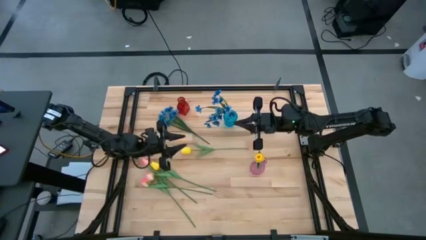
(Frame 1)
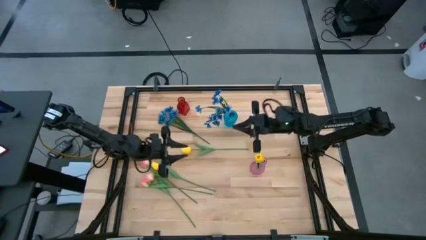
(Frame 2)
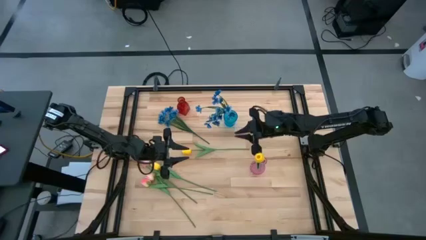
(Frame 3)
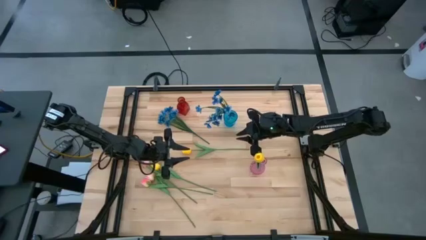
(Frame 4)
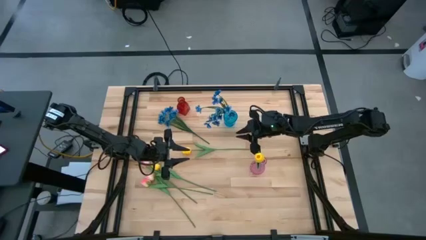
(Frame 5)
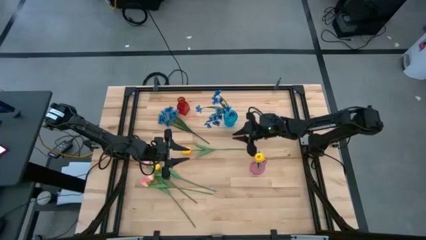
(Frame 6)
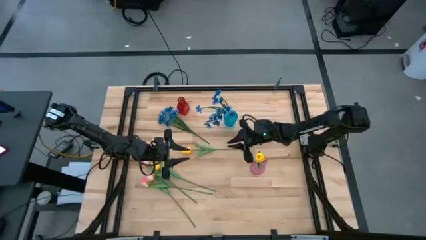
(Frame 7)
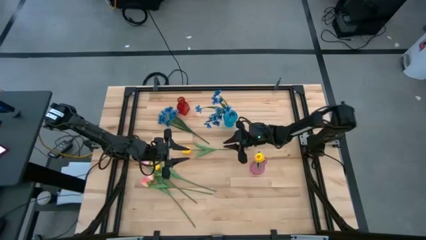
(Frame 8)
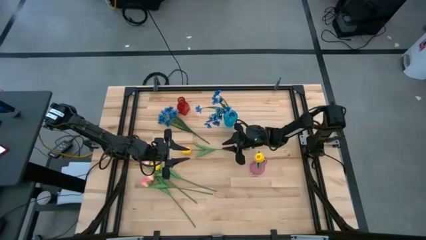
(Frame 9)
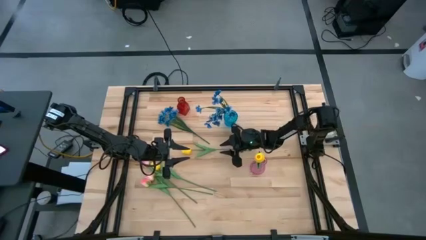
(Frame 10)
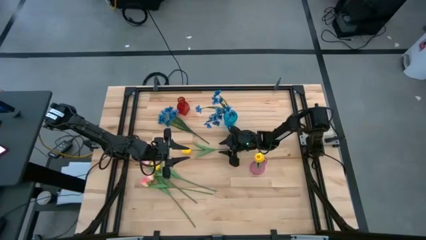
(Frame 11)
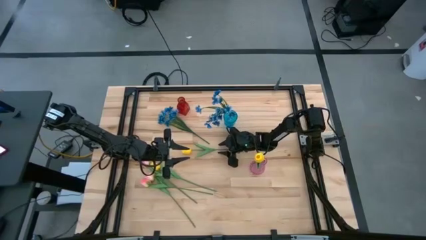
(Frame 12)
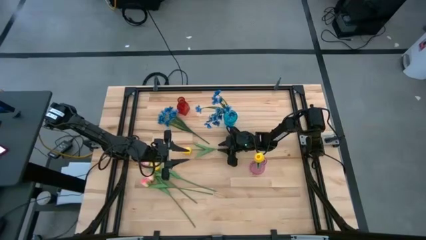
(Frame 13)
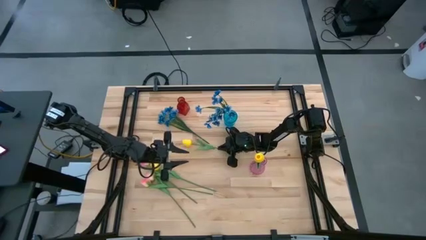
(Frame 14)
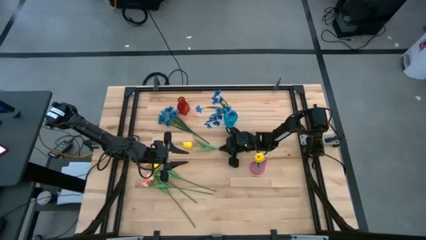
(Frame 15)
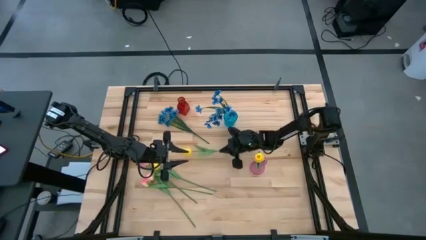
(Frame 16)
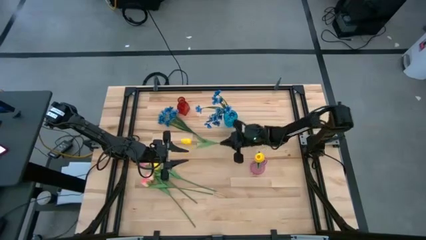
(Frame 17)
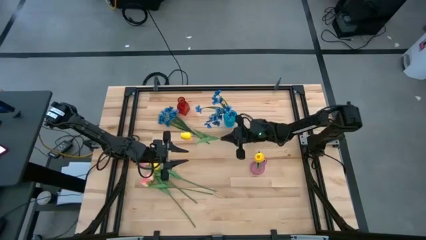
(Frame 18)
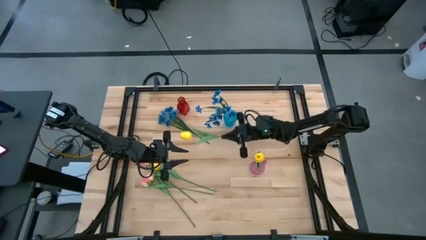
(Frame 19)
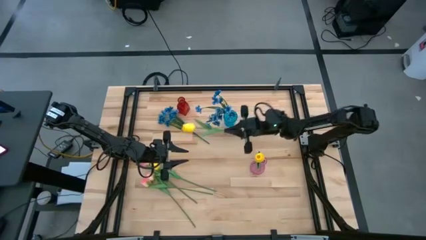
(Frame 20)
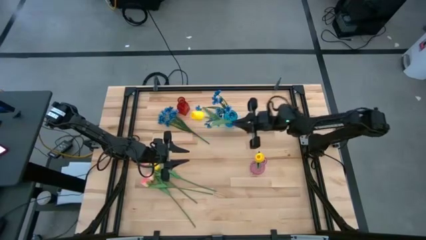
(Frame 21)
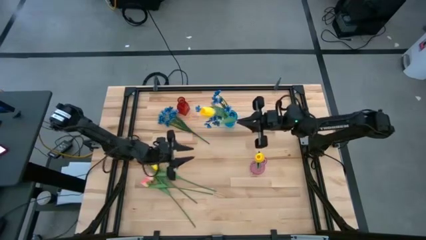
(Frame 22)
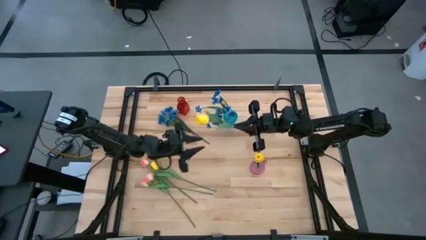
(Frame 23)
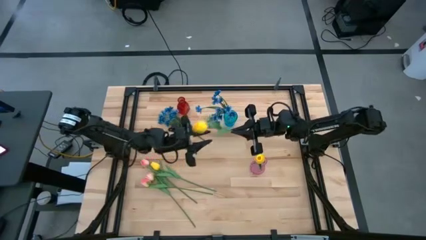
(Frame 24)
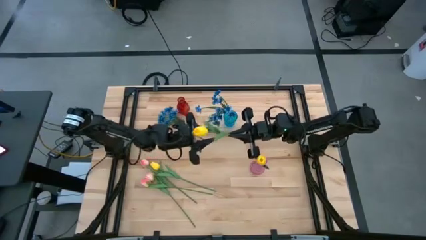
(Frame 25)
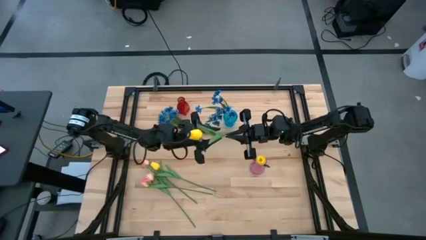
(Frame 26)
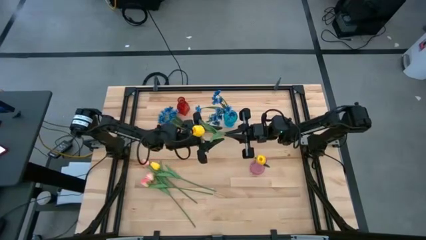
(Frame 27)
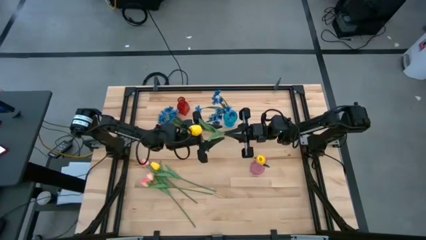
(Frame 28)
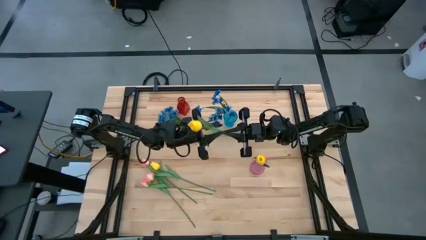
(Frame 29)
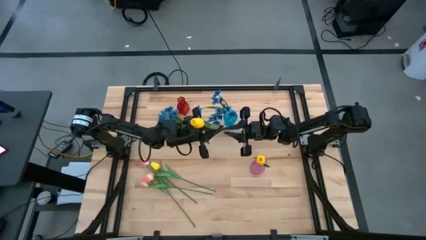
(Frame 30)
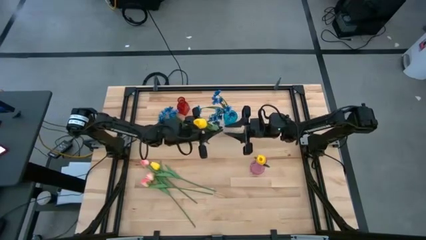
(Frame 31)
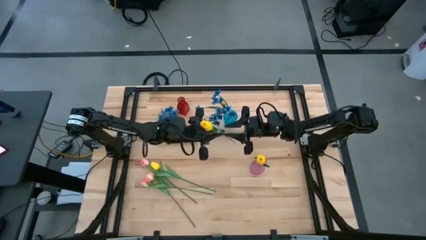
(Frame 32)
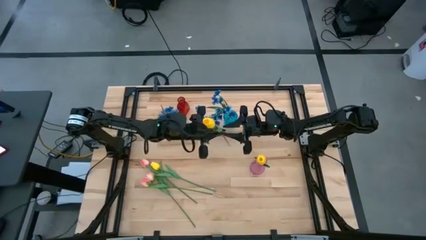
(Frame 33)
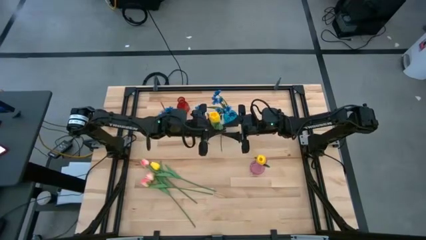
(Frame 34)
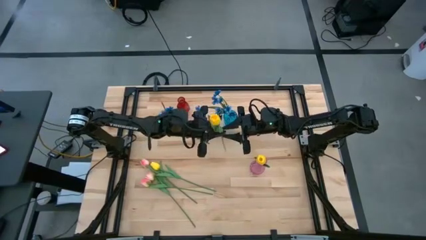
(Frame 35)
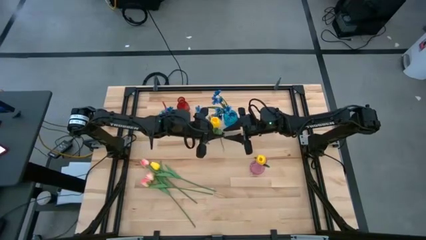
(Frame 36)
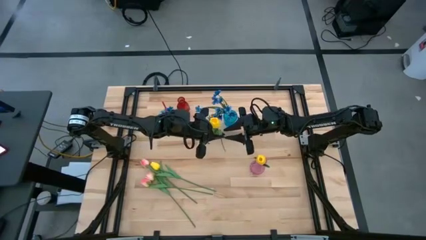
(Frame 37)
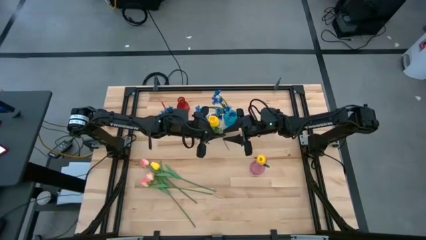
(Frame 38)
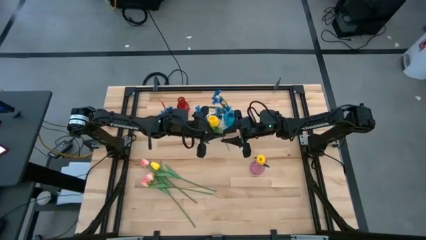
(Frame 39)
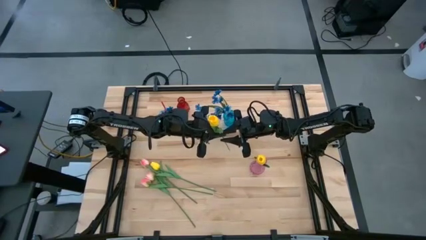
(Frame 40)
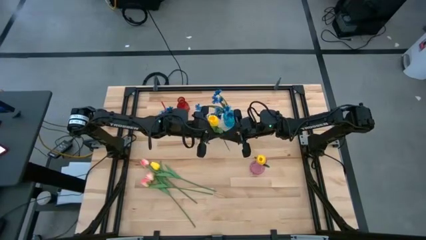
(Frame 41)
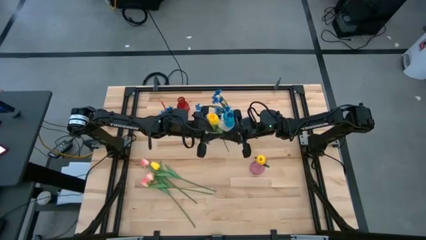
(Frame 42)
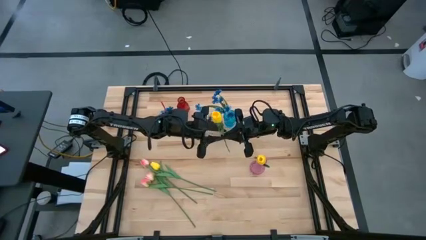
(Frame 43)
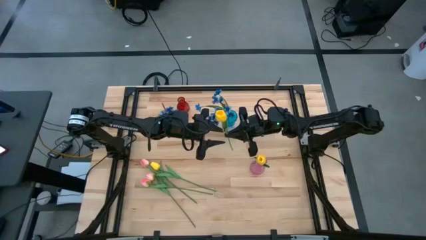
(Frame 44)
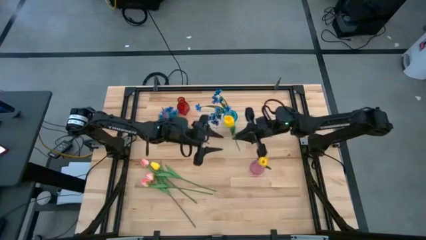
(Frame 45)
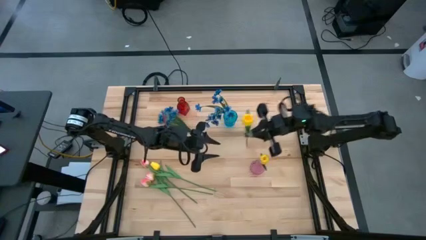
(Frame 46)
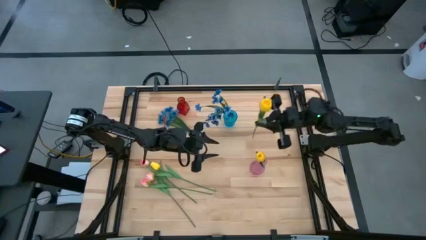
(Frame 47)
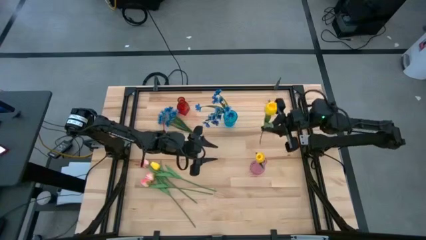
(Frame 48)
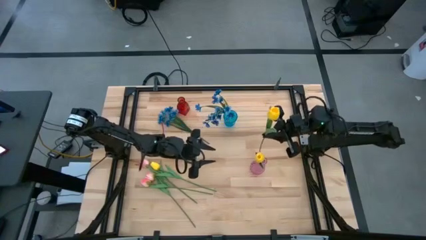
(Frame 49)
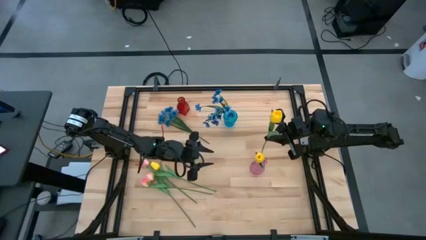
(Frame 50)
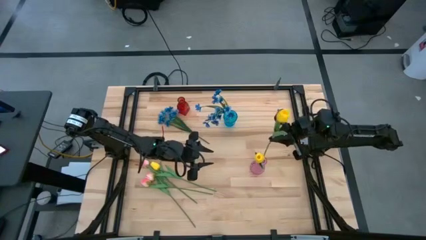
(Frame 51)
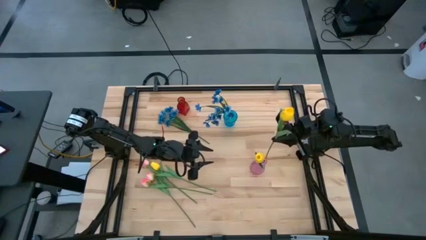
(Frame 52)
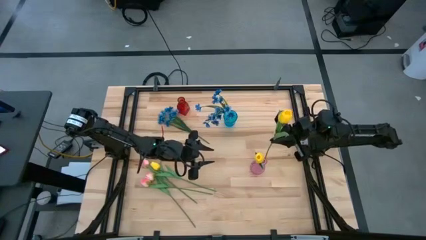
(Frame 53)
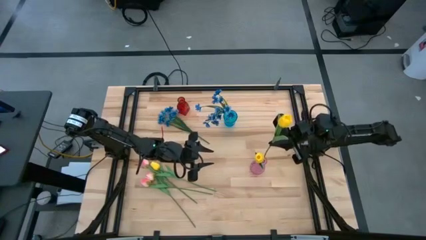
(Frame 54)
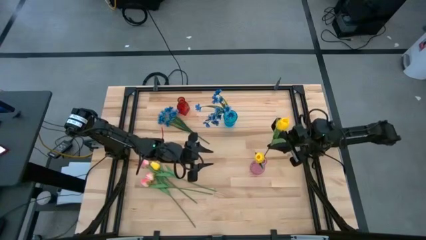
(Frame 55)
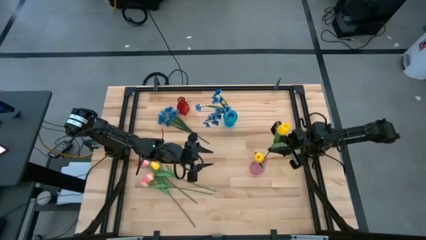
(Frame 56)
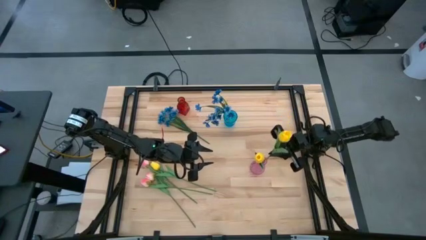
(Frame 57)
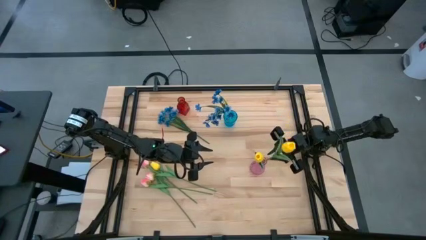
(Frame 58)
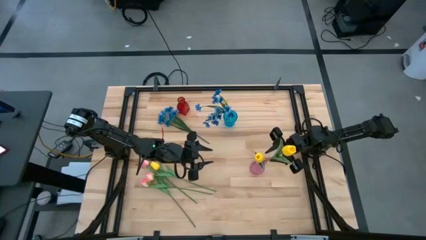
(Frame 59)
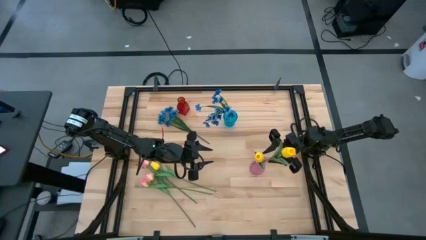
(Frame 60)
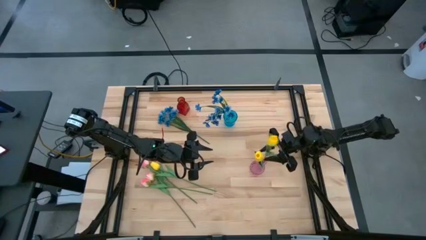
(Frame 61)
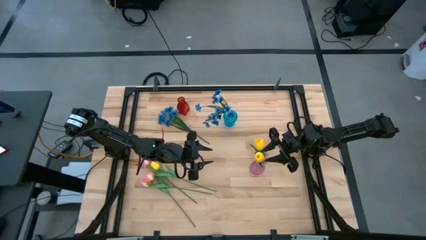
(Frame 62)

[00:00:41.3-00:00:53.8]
Task: Sort flowers into vase by color
Put the top yellow tulip into the violet flower vase

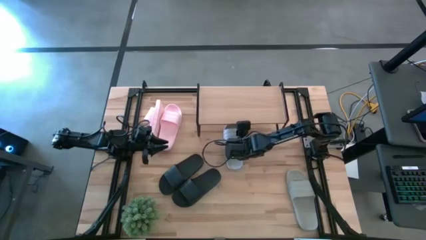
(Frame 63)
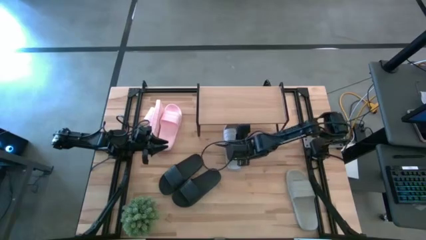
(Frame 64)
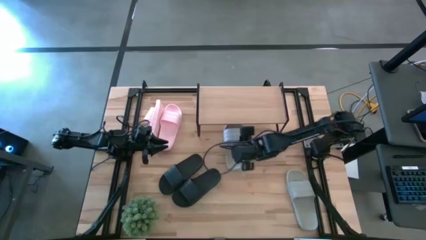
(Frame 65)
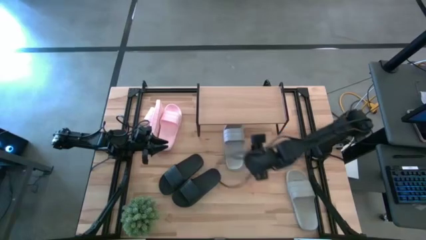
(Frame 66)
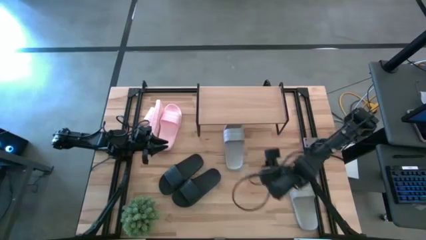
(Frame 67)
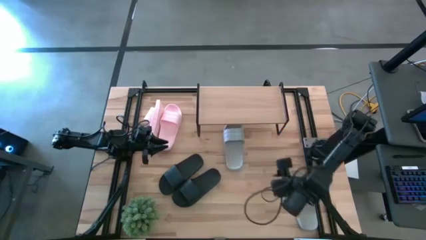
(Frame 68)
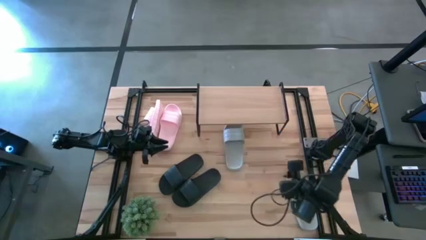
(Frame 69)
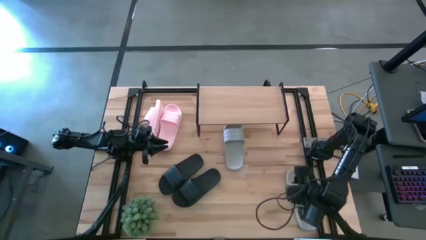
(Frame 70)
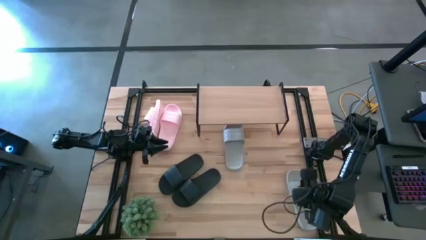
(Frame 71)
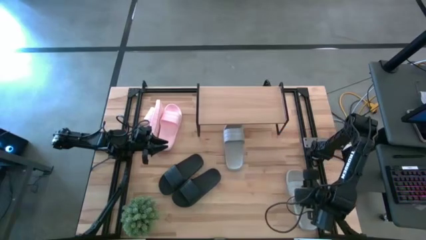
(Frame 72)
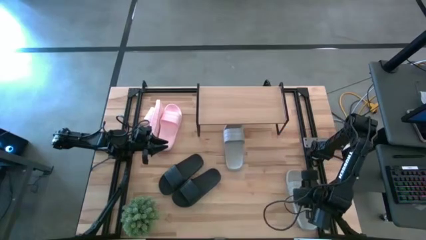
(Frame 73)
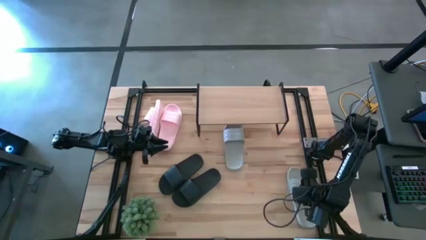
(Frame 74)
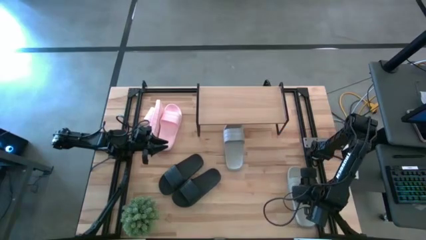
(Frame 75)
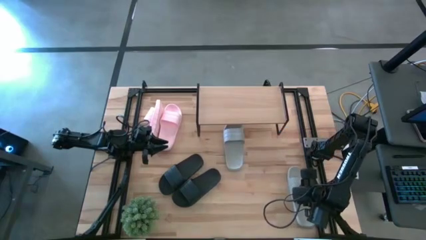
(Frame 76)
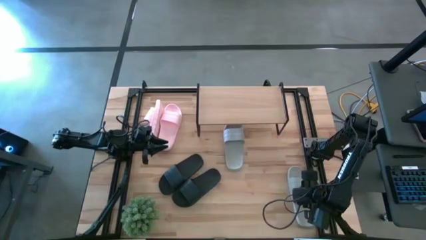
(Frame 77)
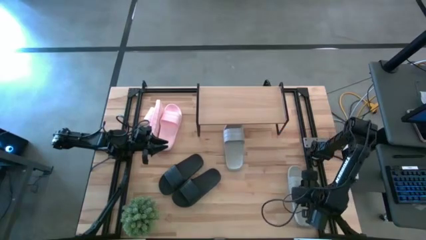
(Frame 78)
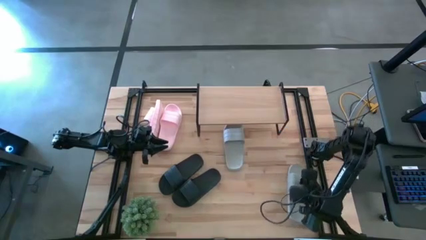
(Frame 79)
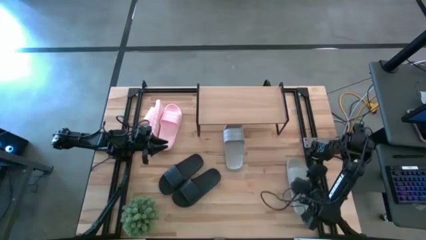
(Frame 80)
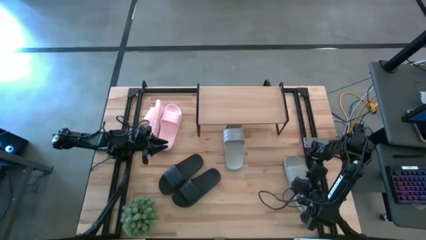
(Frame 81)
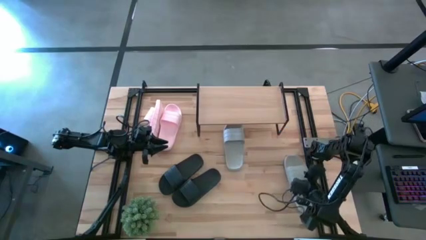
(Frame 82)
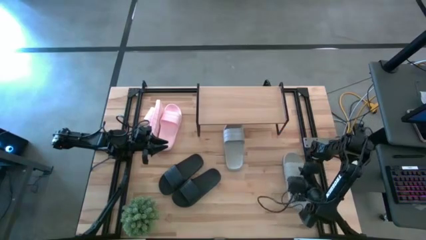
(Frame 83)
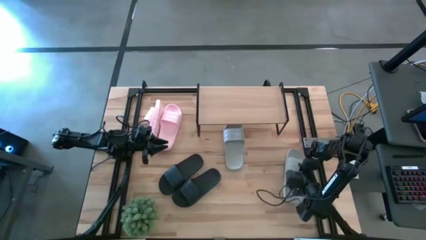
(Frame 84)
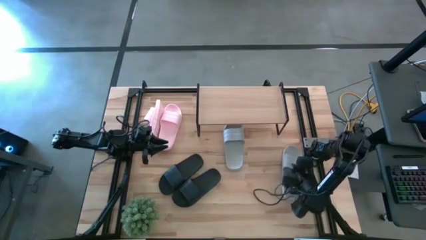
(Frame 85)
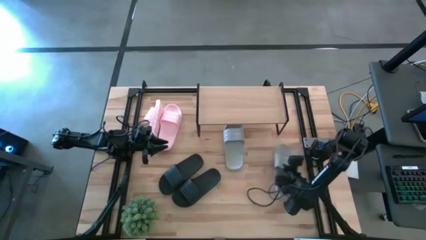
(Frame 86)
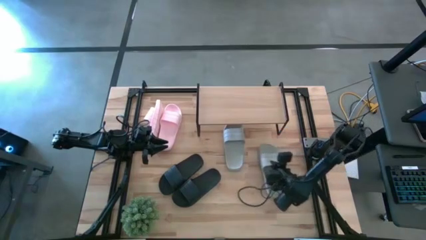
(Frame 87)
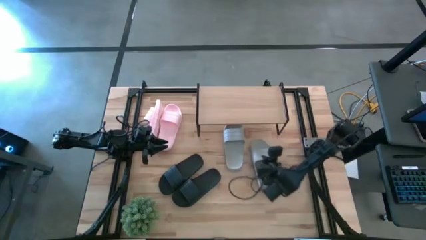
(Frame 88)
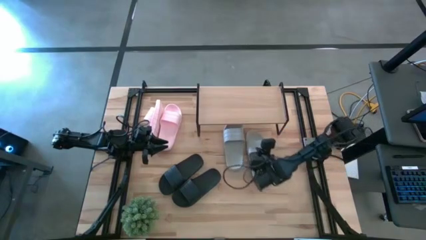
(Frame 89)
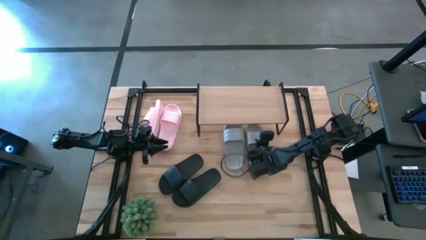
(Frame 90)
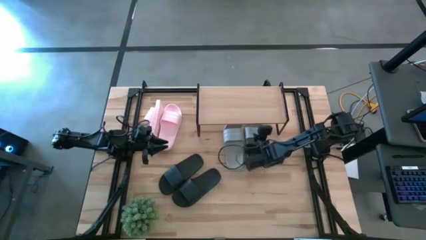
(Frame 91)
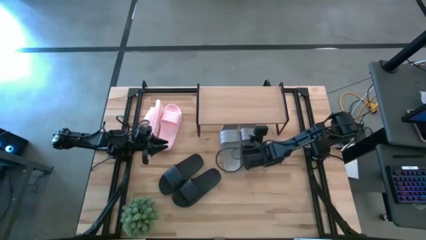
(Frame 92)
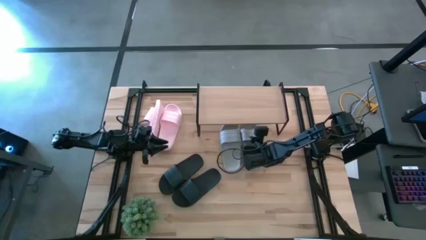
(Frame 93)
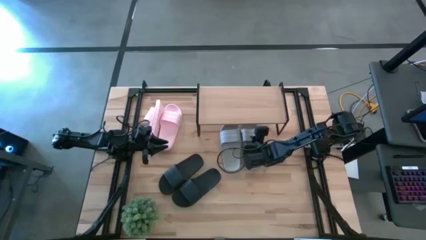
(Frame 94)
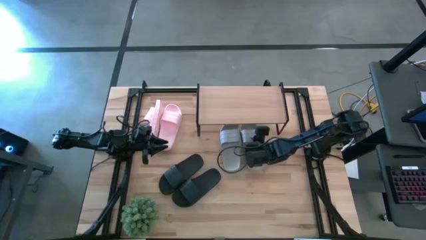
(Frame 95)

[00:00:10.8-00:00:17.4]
Task: Pick and place slides into the shelf
Put the gray slide under the shelf
